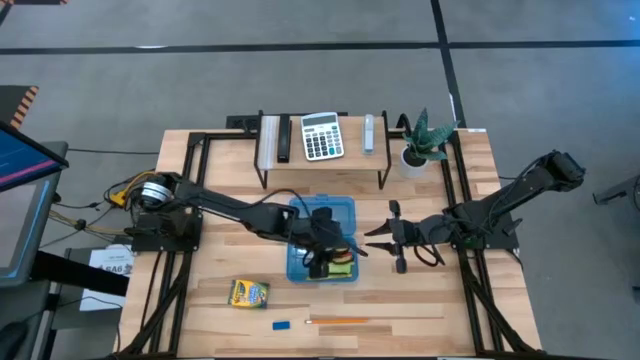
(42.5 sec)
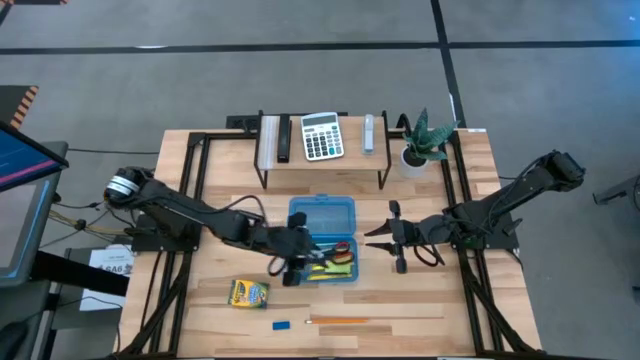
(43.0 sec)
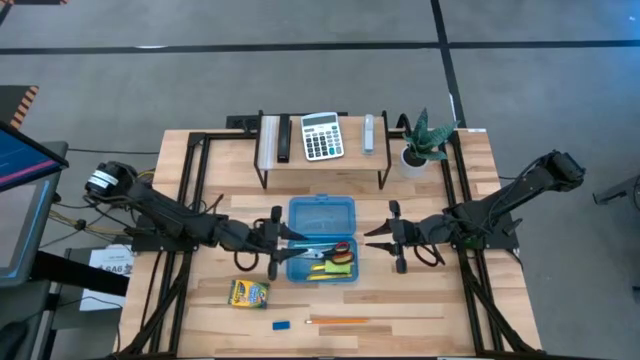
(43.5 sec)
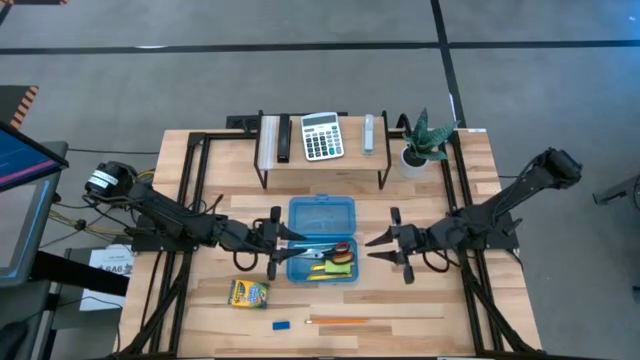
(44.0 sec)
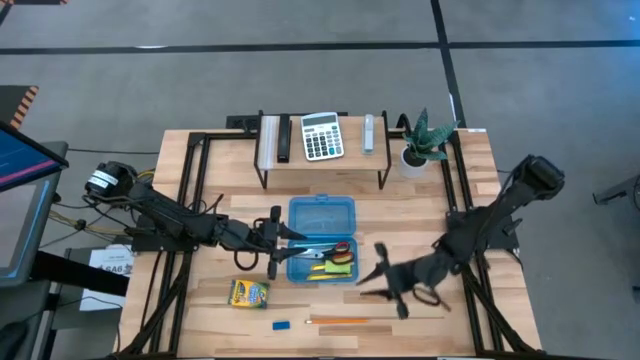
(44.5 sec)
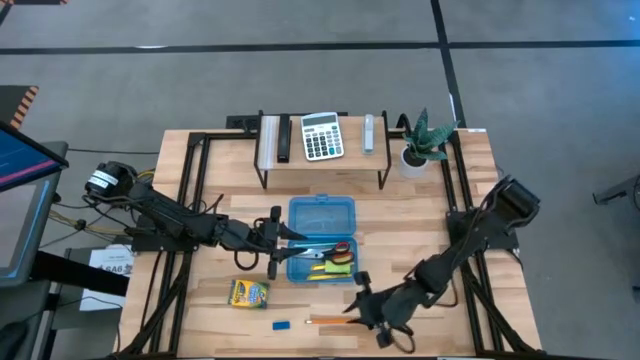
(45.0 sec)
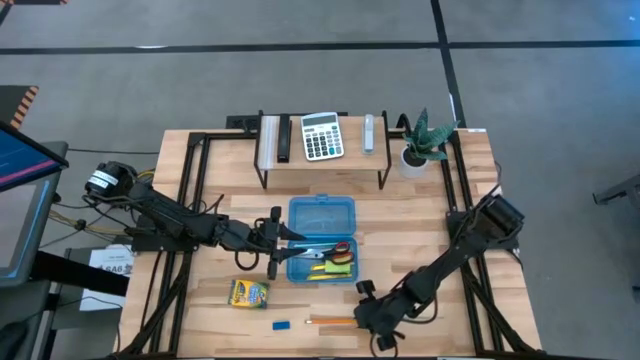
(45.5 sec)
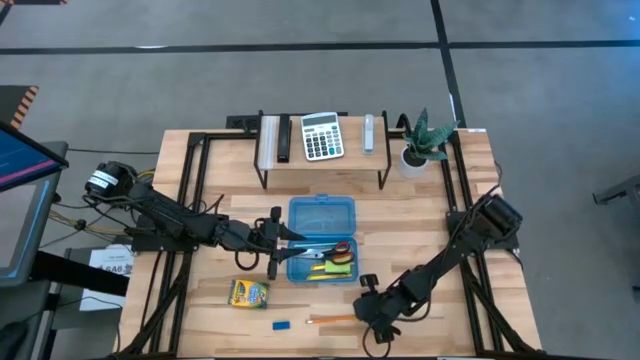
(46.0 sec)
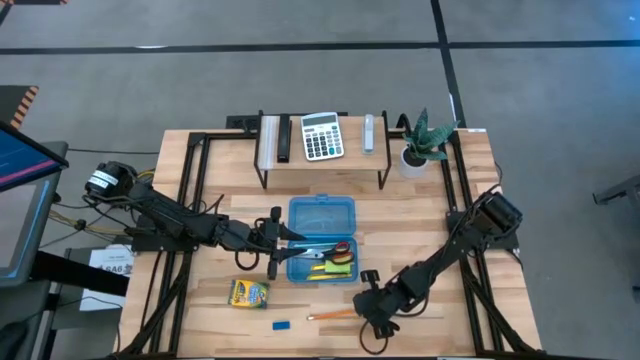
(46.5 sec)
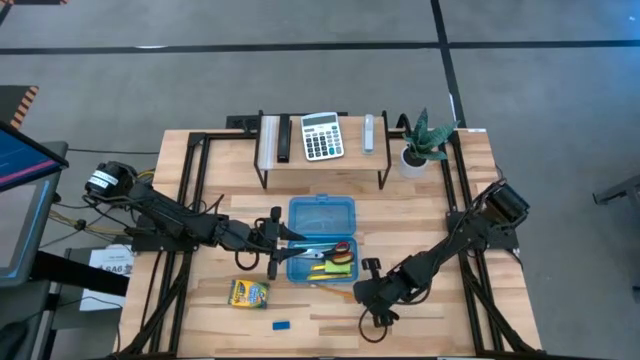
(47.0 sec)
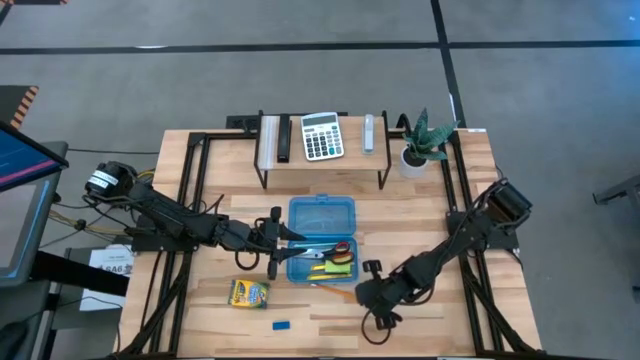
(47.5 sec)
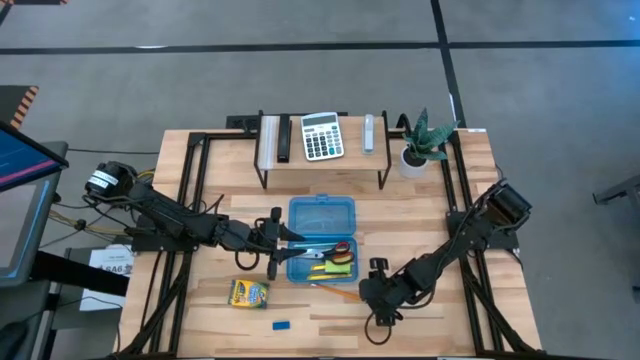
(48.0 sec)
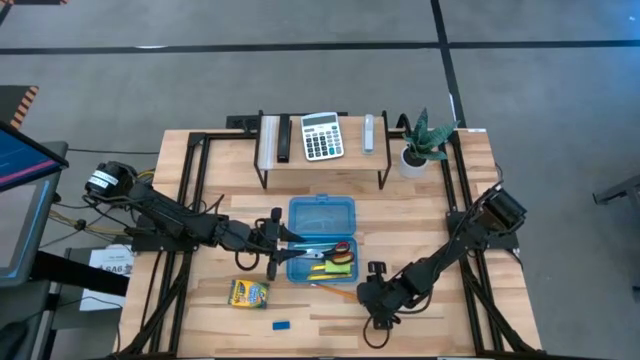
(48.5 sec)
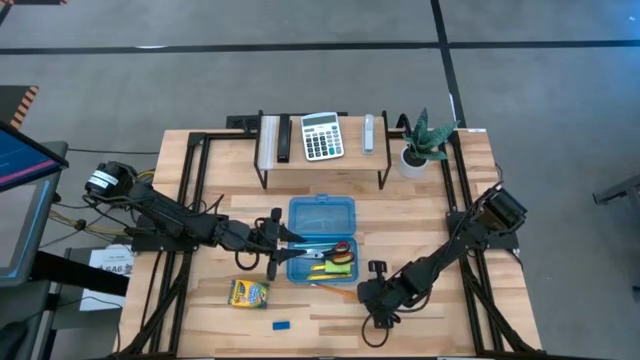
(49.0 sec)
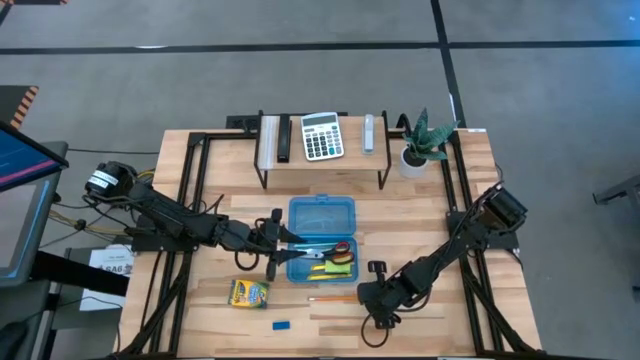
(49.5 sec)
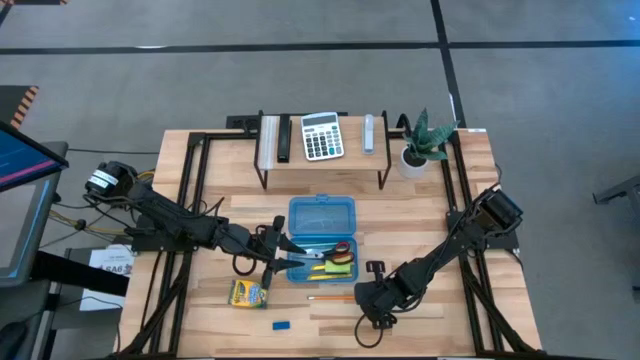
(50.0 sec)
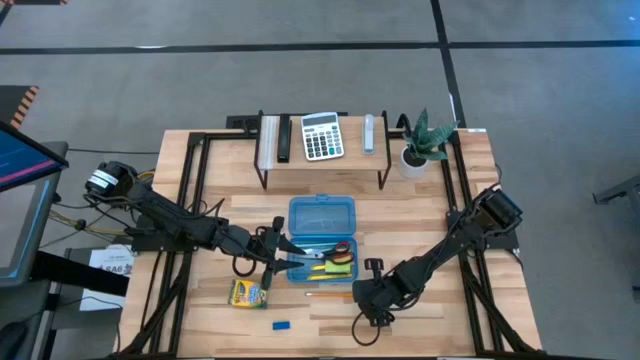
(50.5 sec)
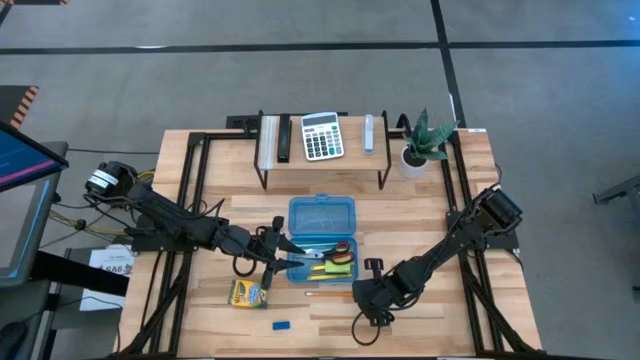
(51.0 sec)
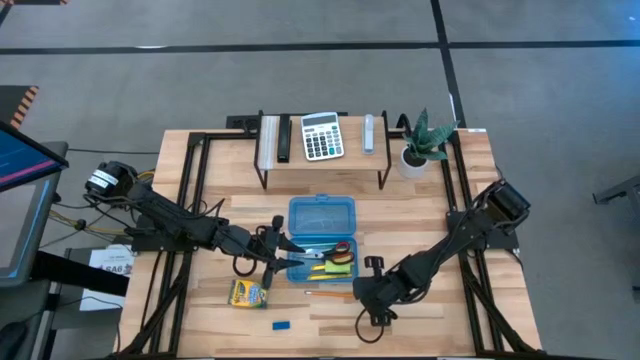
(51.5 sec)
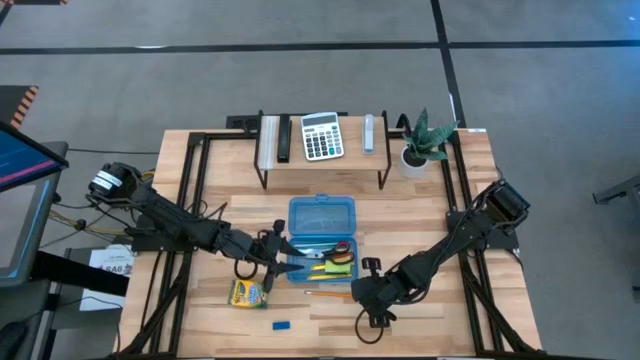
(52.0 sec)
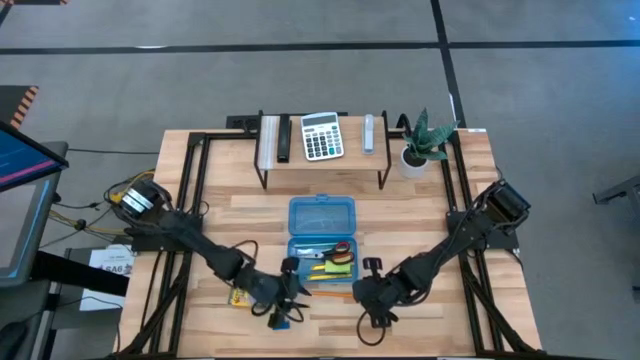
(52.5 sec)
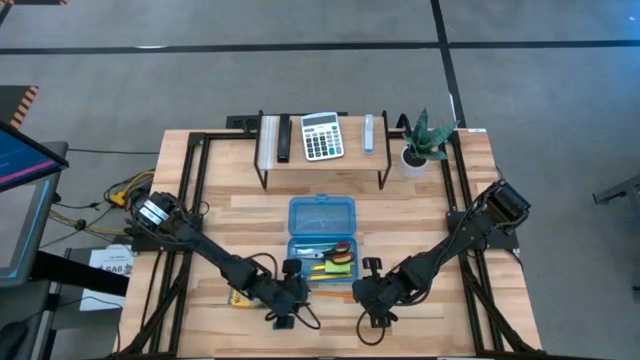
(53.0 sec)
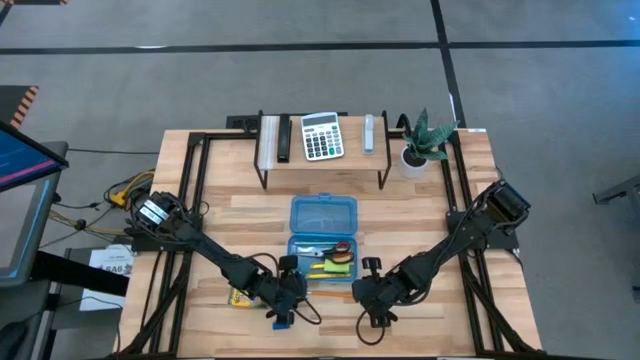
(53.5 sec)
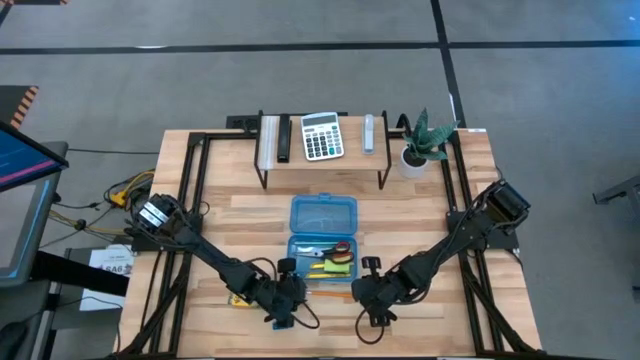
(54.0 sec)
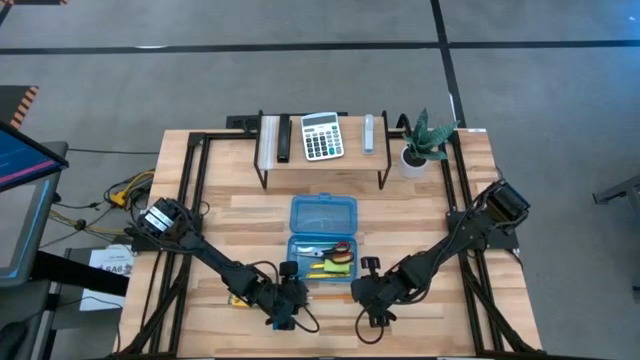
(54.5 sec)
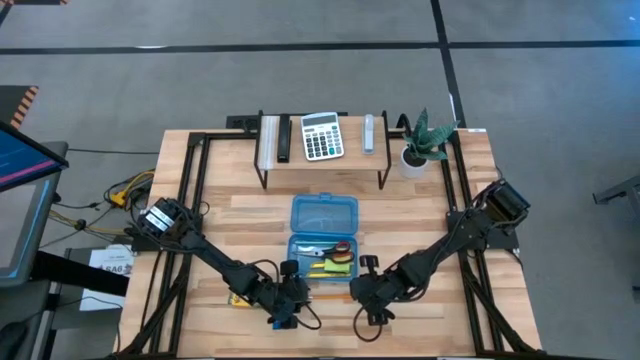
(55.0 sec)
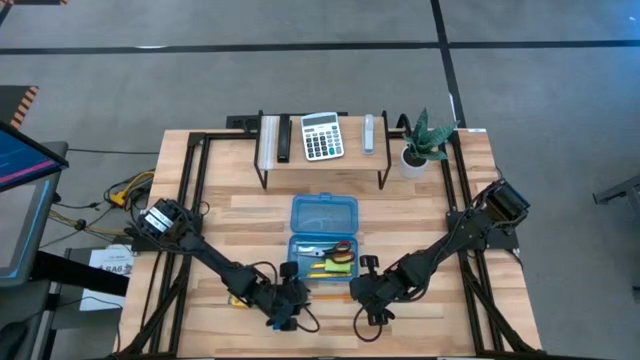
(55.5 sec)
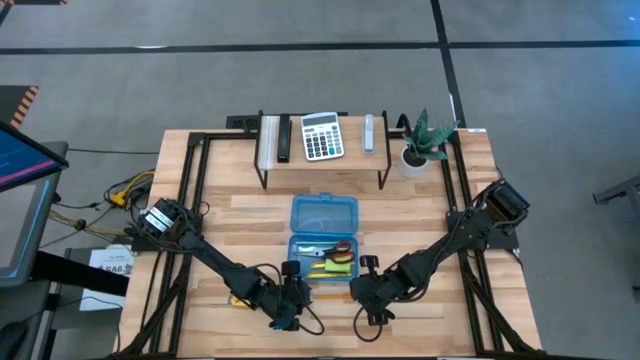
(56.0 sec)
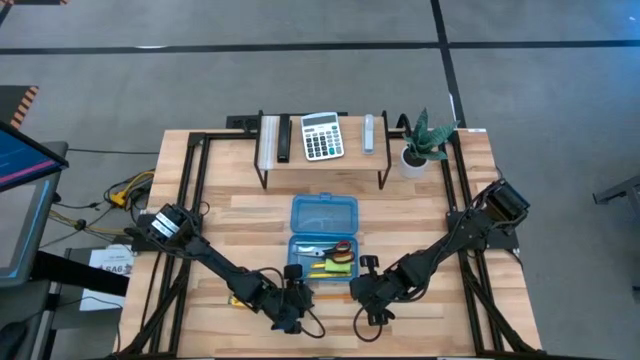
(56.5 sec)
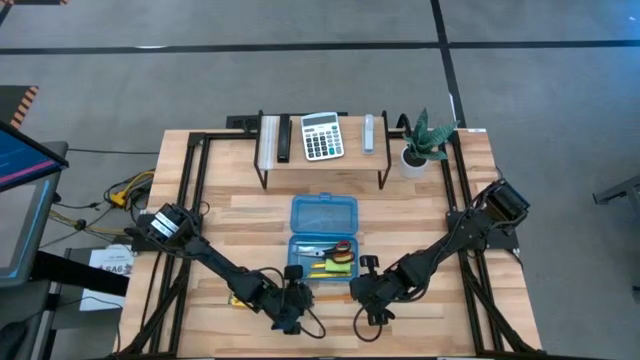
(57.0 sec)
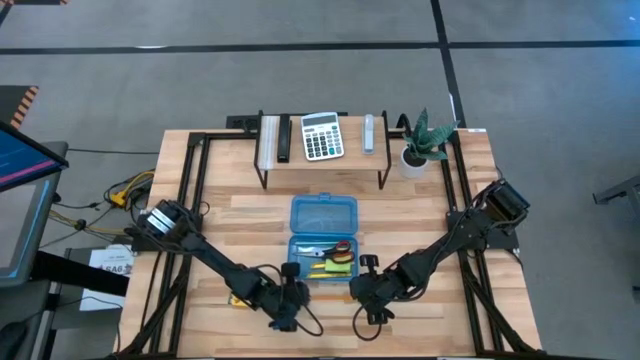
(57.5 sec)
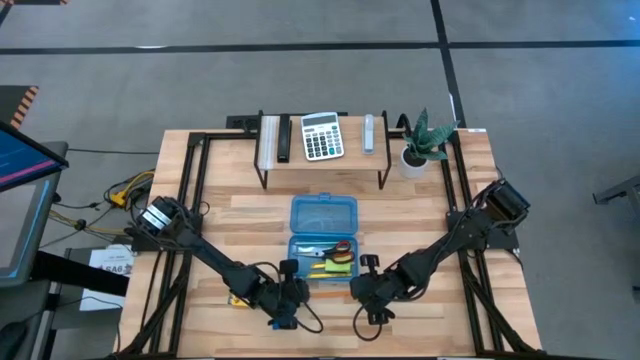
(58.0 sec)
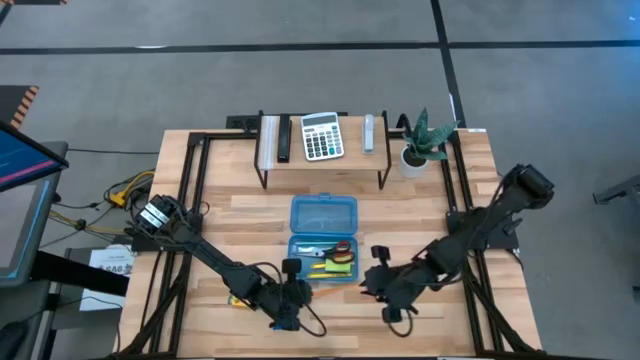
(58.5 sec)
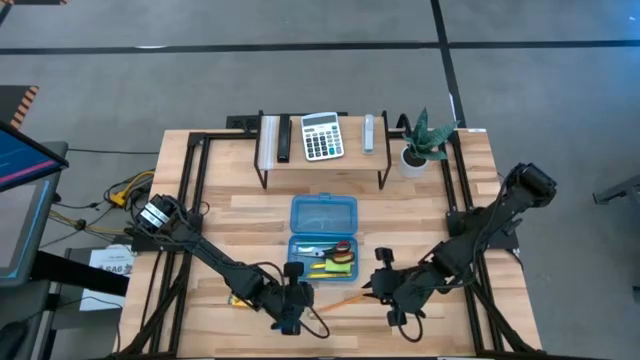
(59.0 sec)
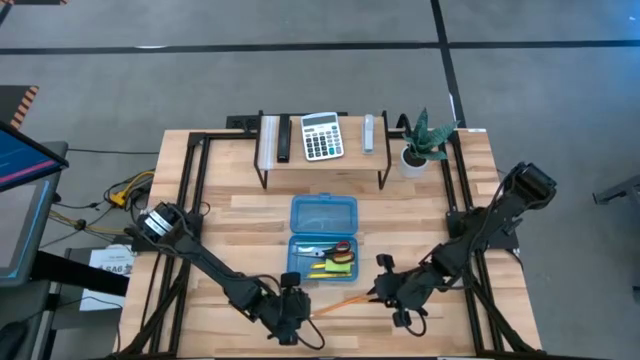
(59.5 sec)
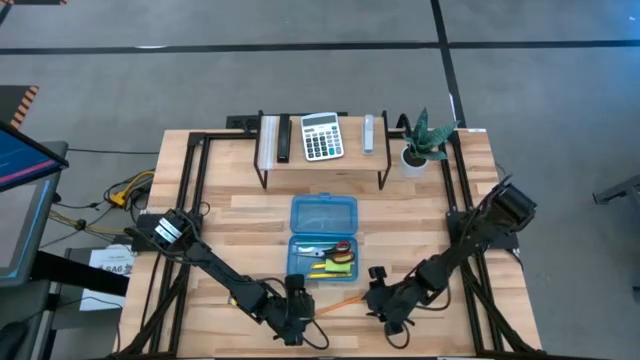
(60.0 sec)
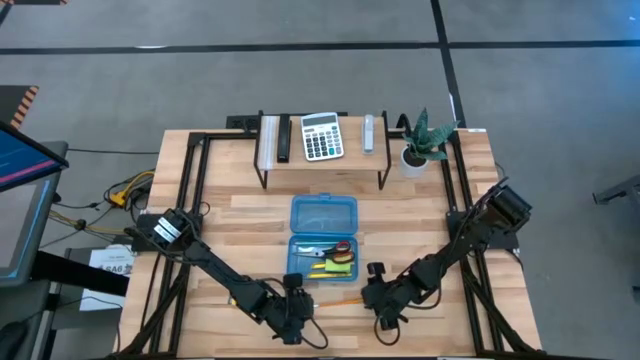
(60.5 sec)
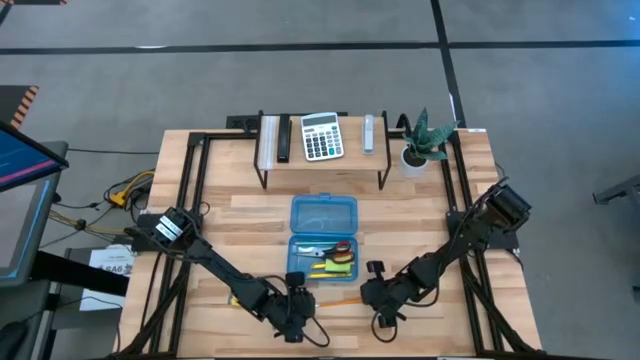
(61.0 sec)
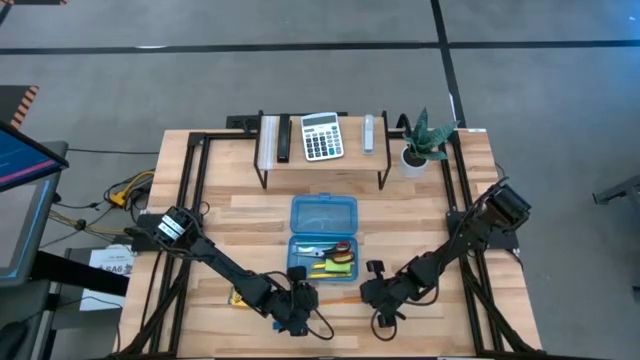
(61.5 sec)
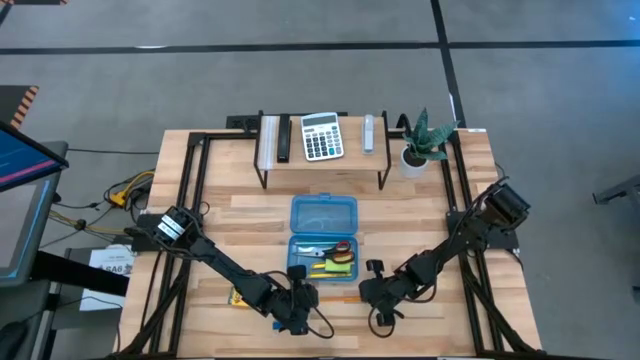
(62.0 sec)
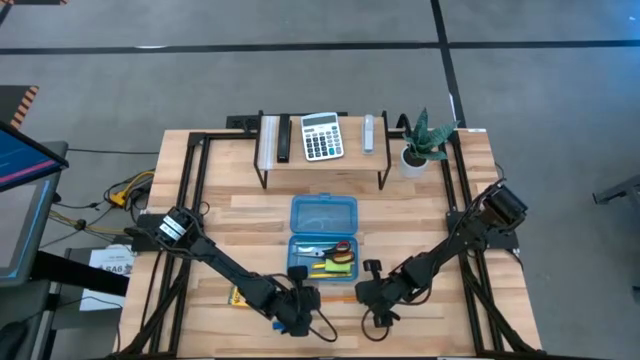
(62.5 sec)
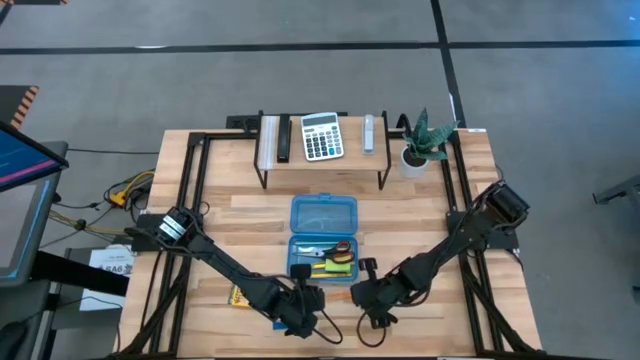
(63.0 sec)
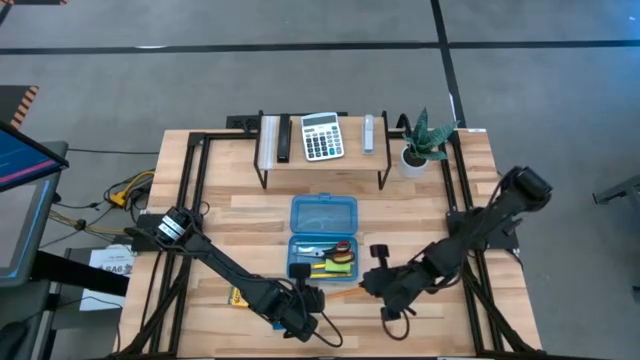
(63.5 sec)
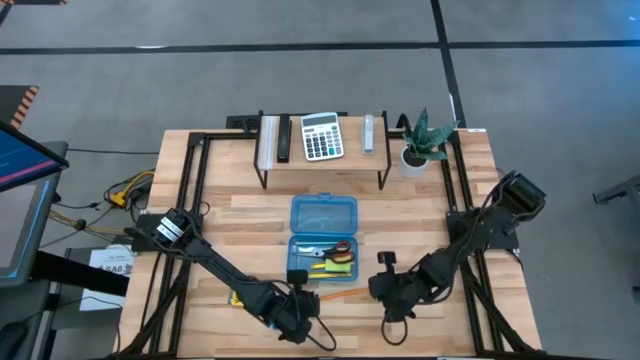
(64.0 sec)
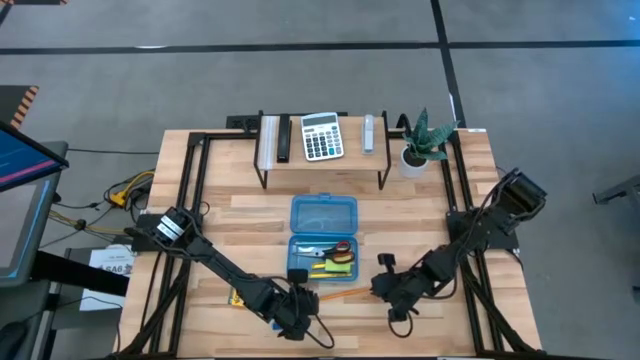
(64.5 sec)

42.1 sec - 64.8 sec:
Task: Pack school essentials
Put the orange pencil into the blue supply box
